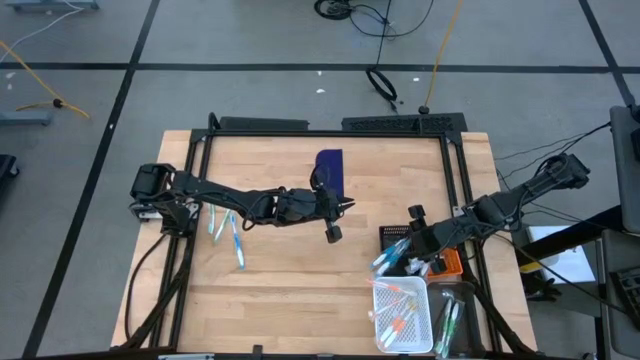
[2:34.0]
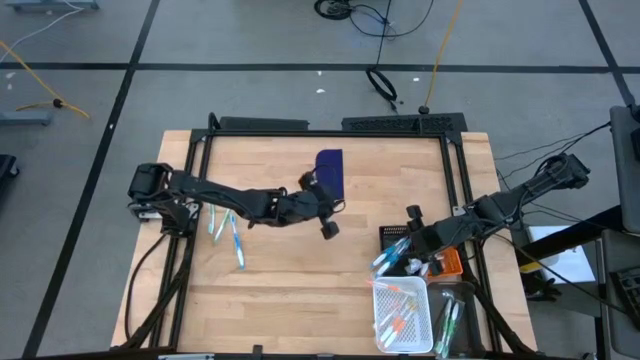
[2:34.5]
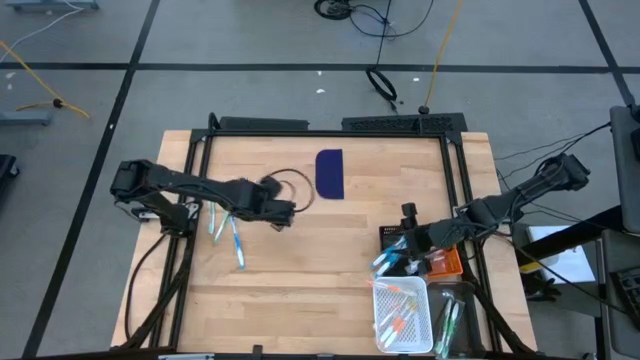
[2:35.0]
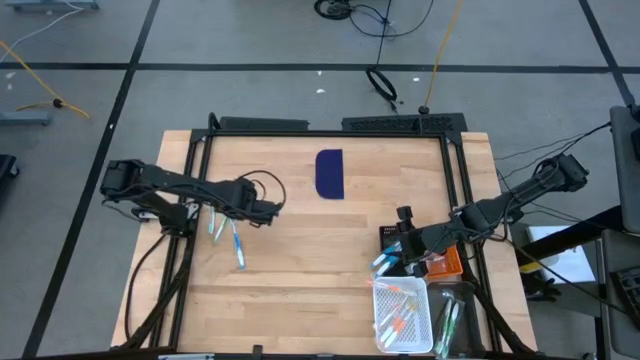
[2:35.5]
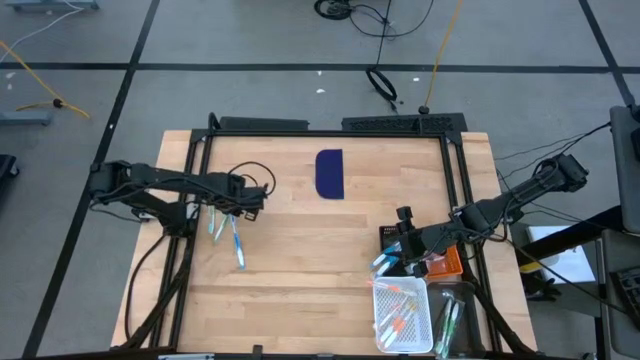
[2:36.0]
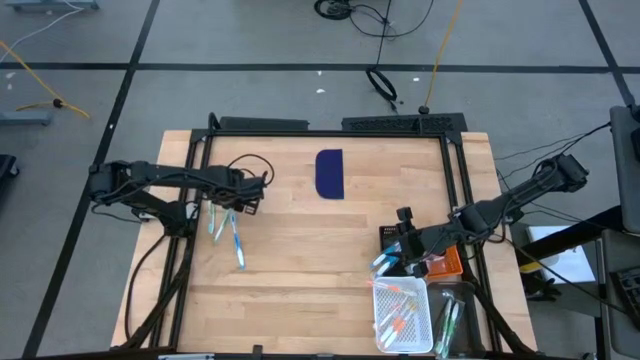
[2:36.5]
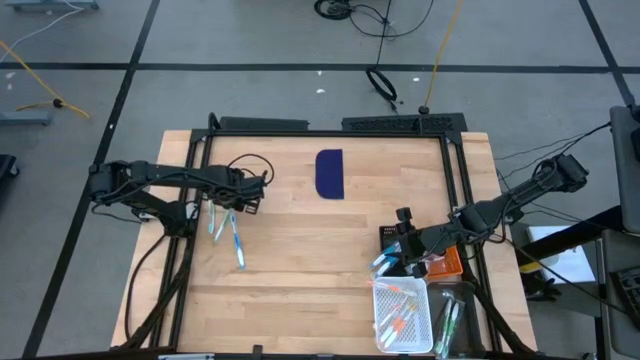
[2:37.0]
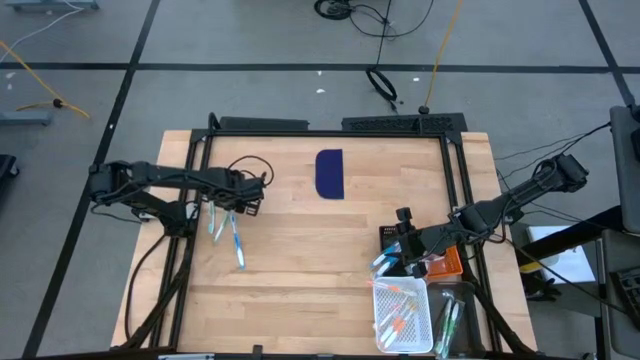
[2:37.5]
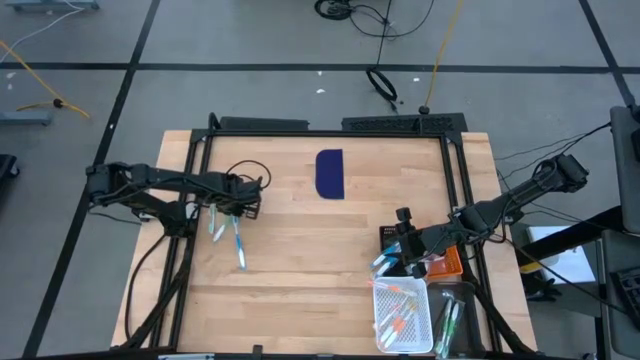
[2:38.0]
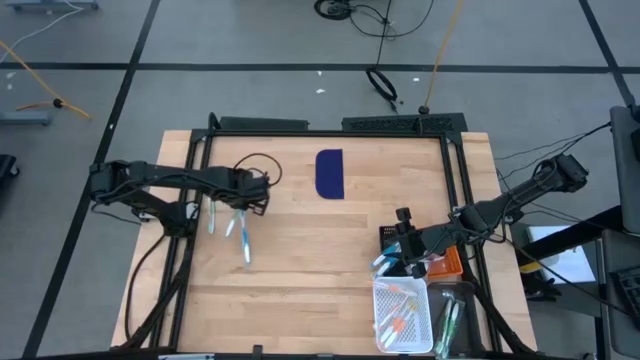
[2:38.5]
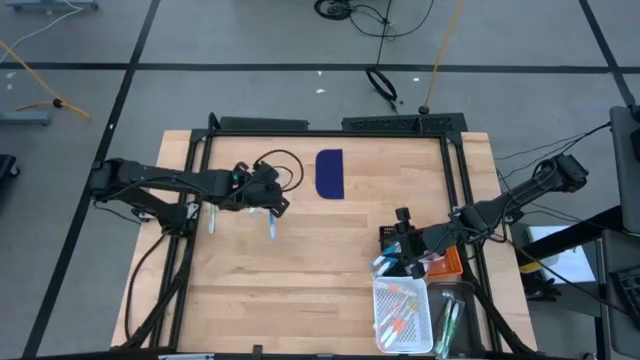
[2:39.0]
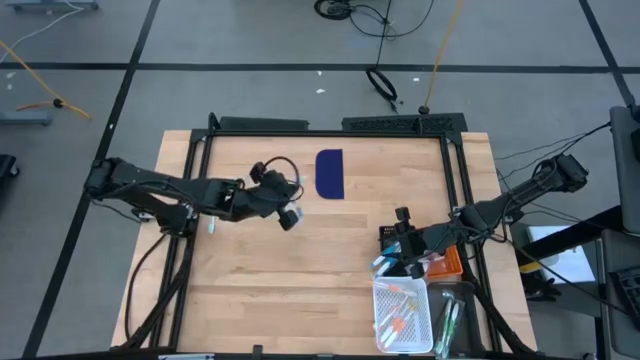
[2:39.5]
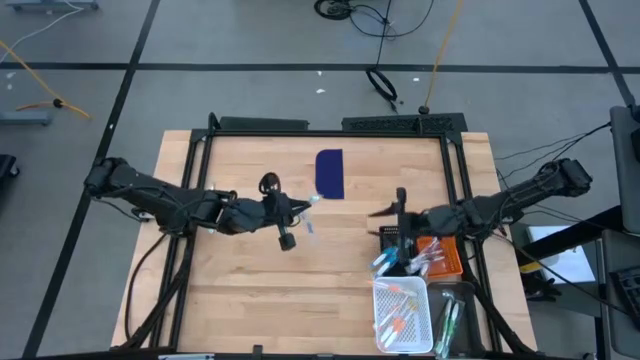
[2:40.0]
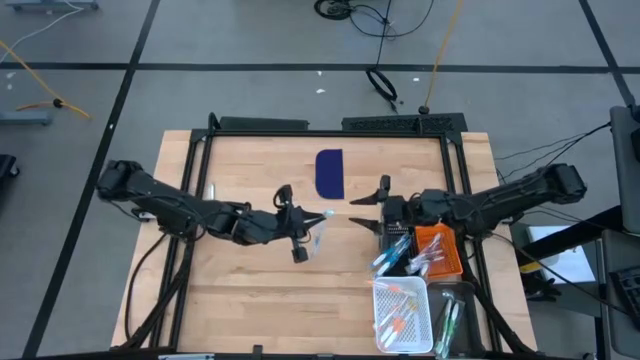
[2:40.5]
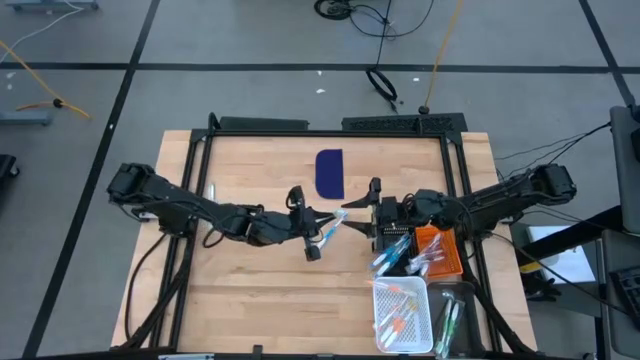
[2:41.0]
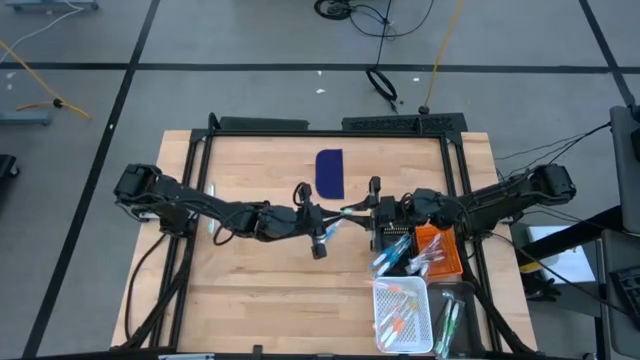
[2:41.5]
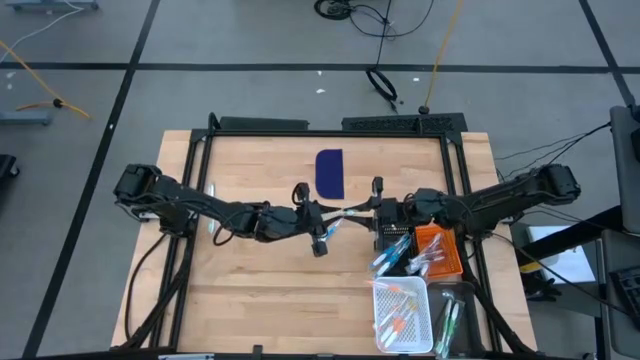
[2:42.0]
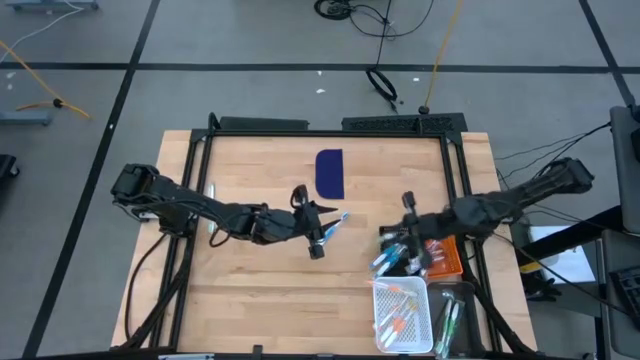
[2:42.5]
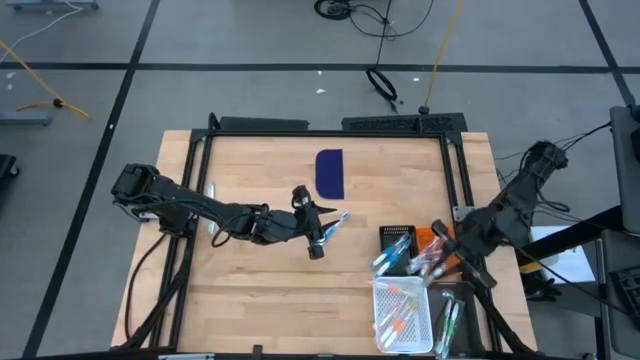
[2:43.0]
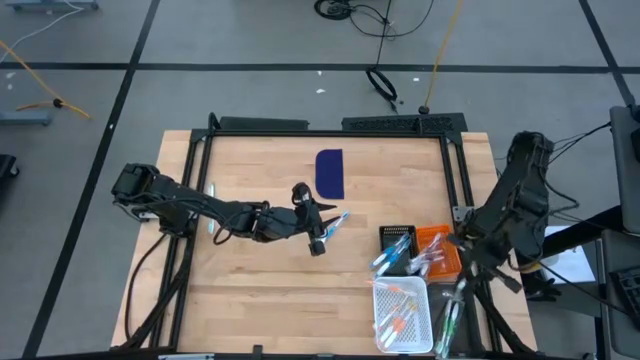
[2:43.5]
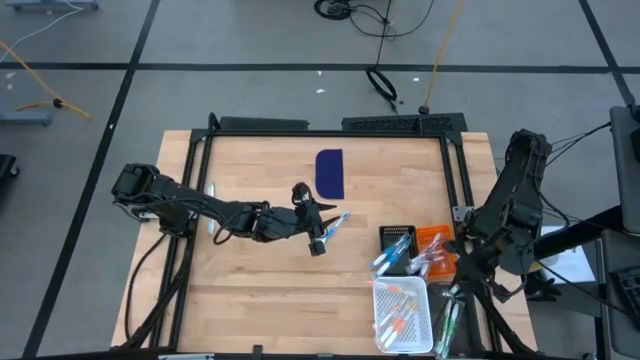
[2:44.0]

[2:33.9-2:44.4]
Task: Pick & Place Toothbrushes
Put the green toothbrush into the black bin

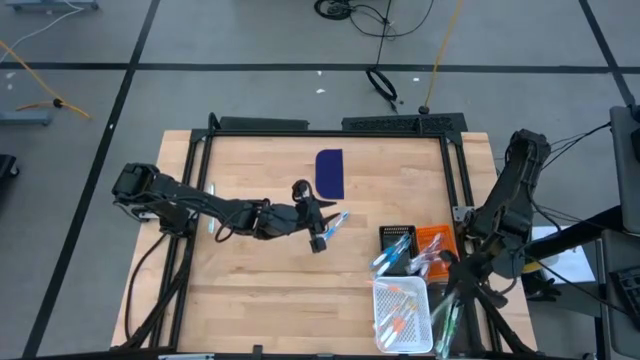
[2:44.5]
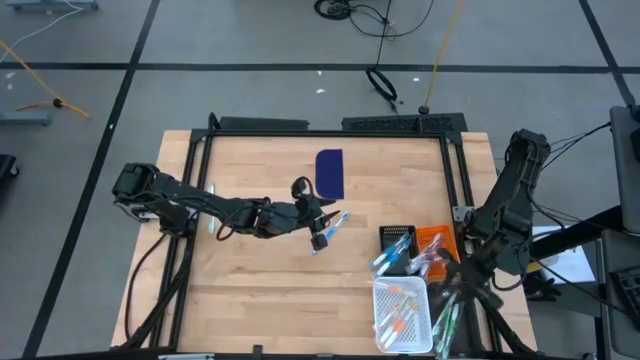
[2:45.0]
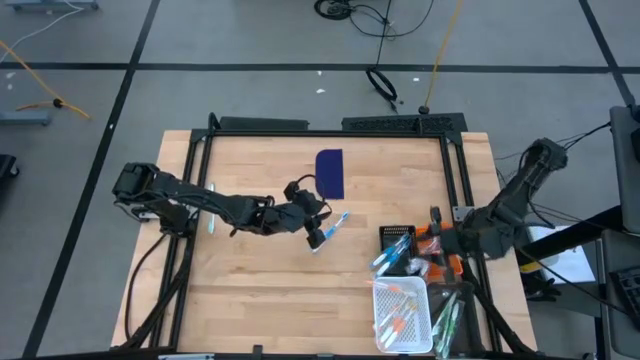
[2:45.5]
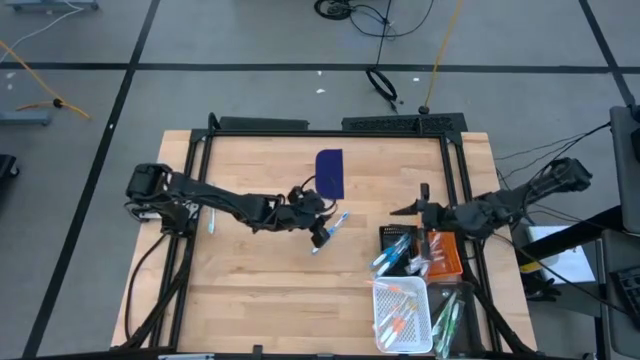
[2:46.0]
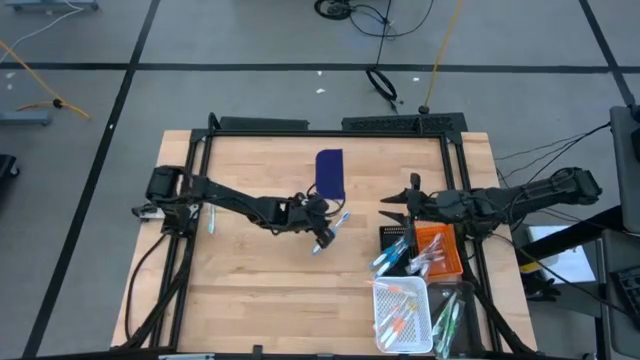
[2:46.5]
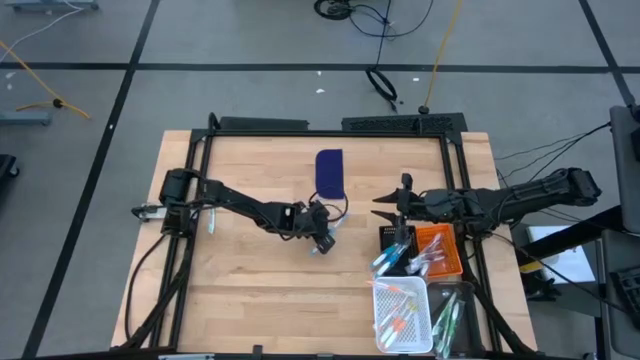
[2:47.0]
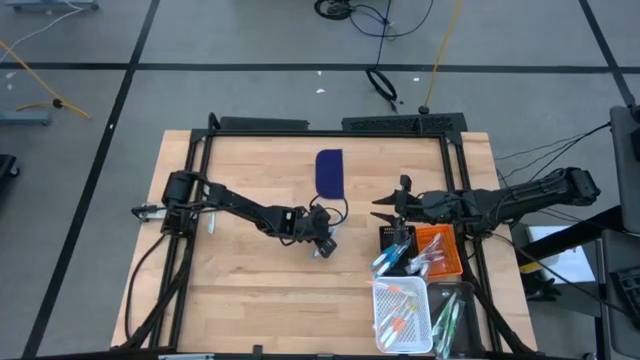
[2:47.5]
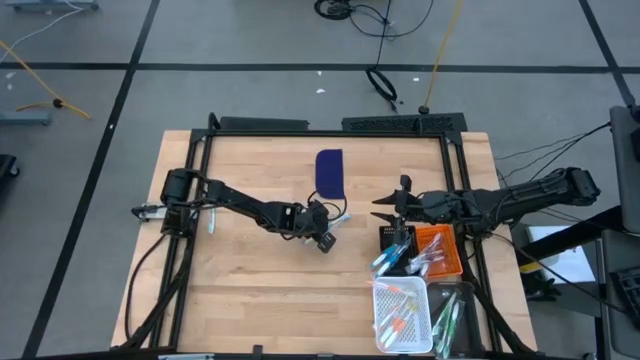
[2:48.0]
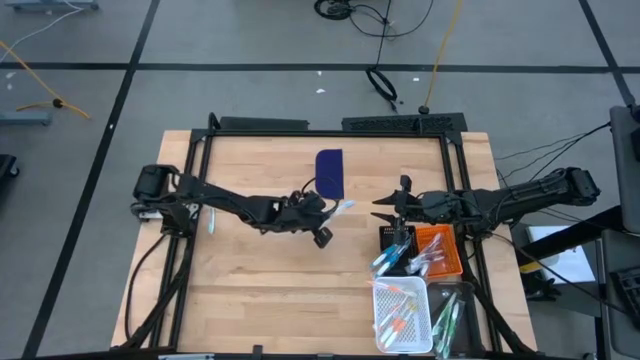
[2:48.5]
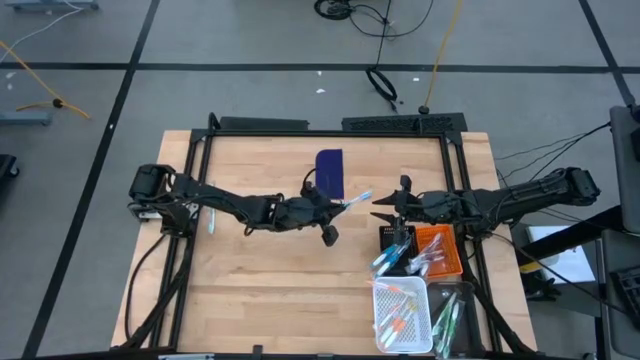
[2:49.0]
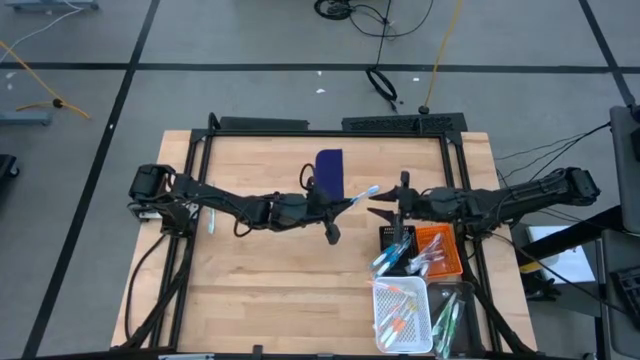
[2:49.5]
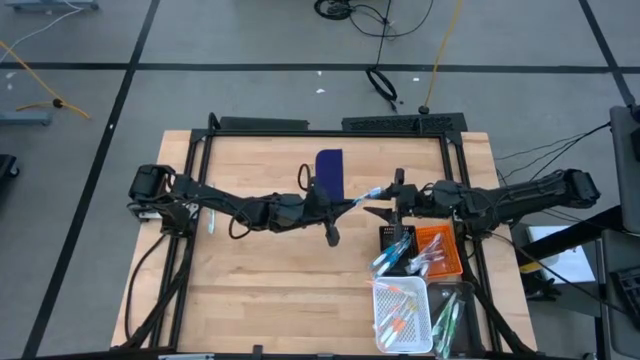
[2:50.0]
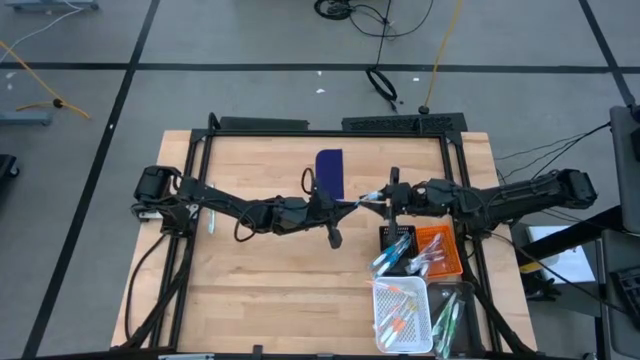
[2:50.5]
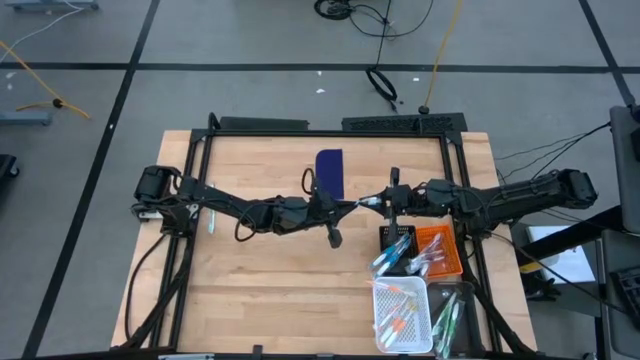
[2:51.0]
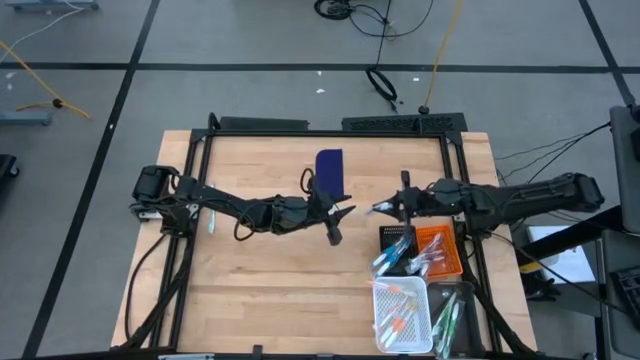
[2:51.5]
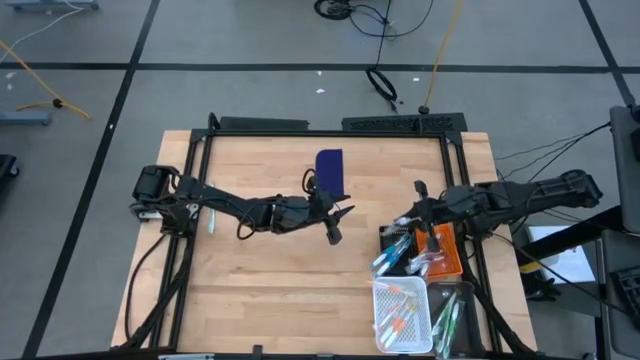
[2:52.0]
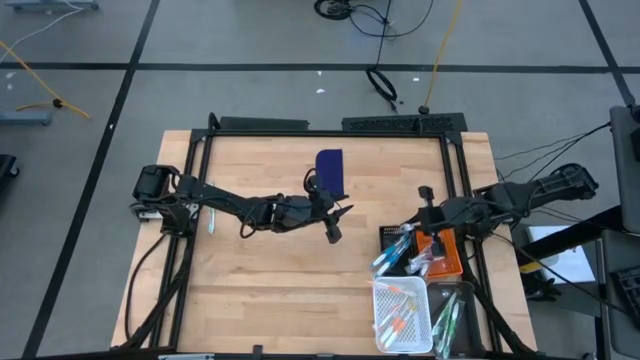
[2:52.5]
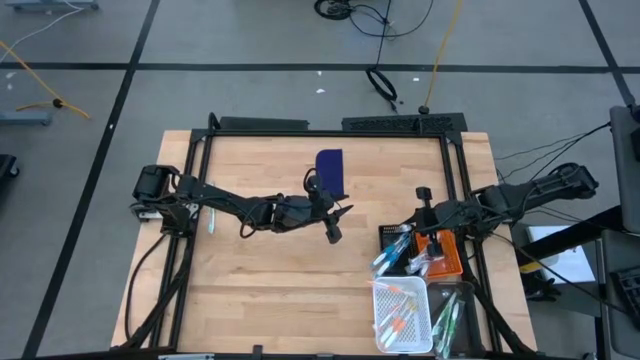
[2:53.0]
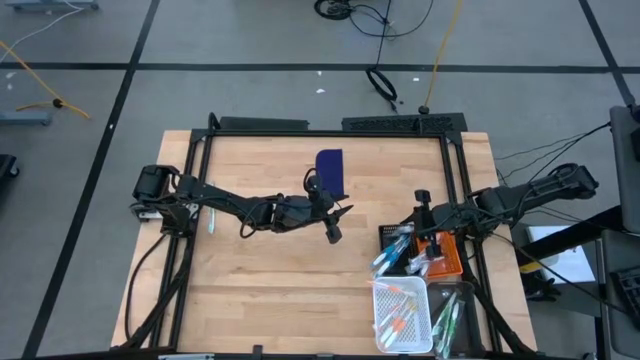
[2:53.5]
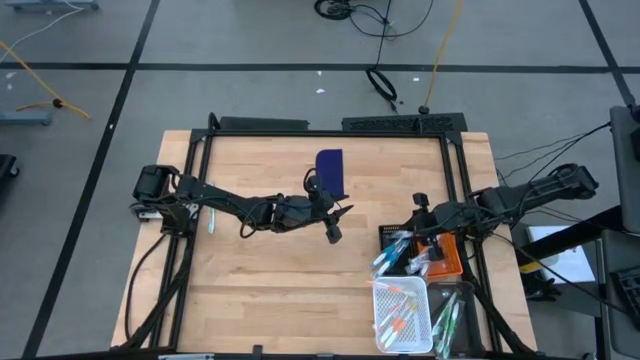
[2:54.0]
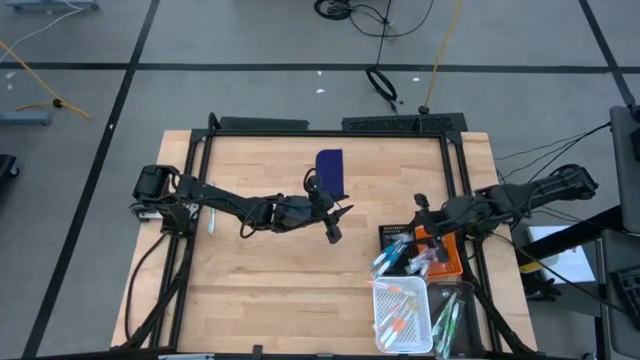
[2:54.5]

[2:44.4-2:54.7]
Put the blue toothbrush into the black basket
